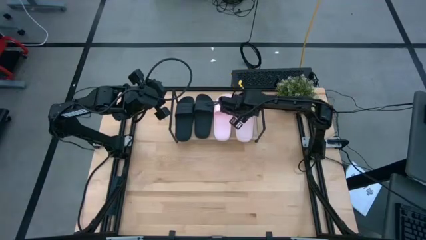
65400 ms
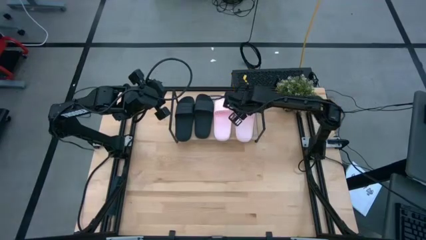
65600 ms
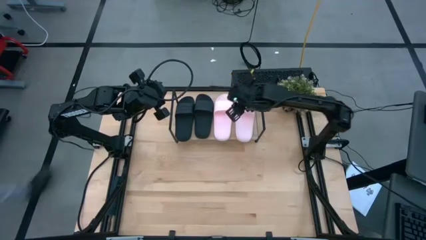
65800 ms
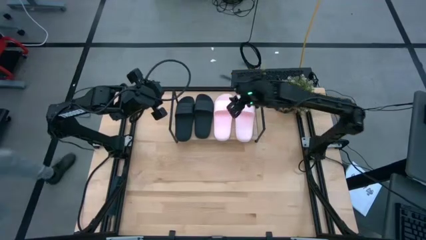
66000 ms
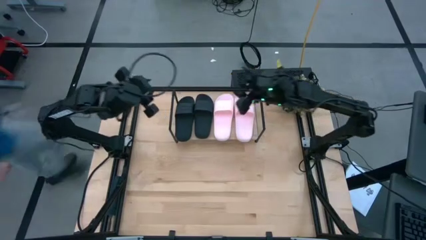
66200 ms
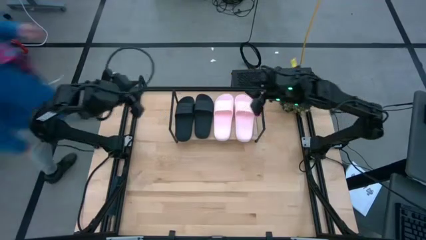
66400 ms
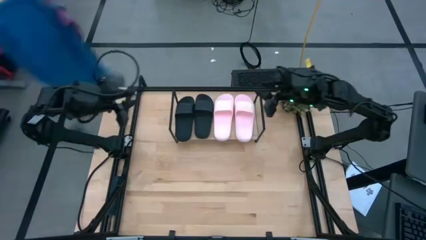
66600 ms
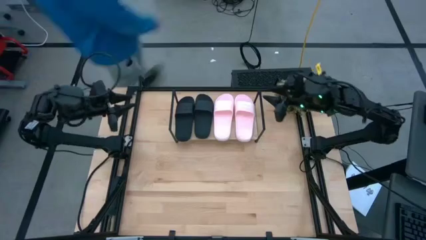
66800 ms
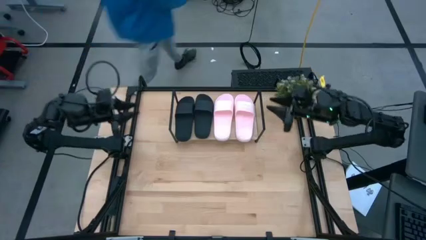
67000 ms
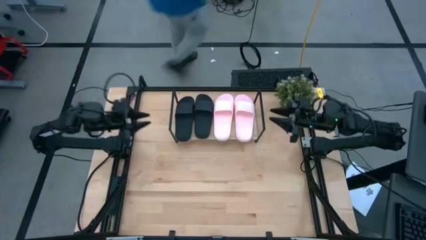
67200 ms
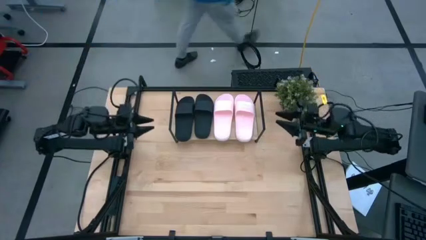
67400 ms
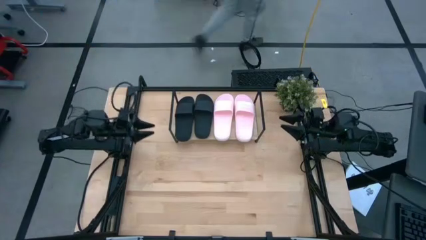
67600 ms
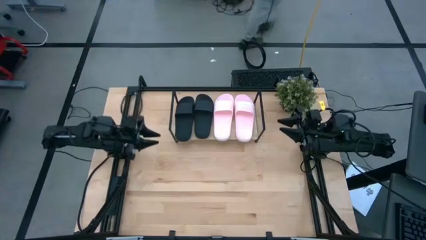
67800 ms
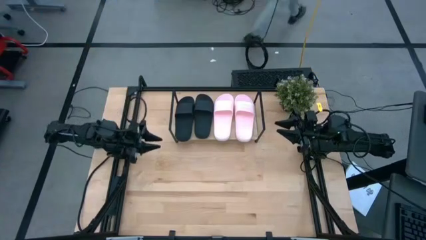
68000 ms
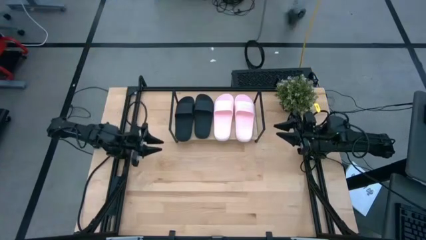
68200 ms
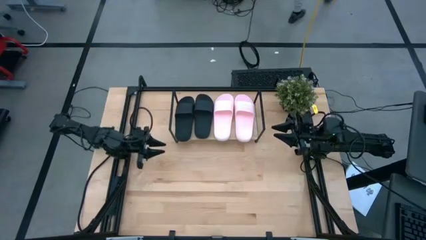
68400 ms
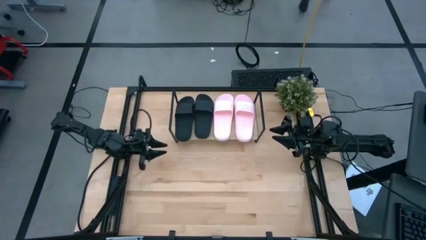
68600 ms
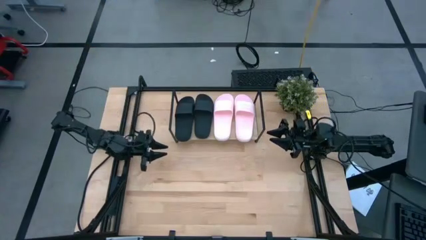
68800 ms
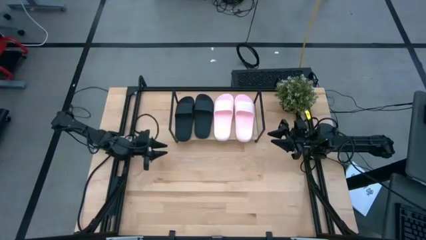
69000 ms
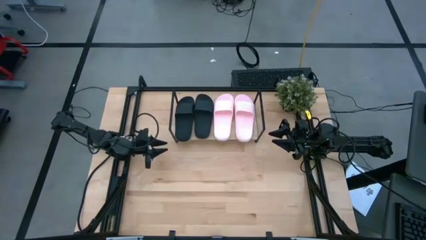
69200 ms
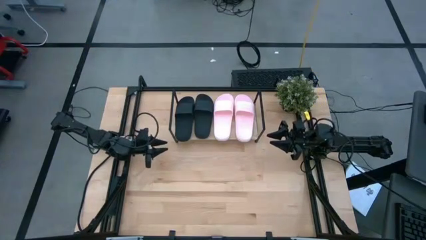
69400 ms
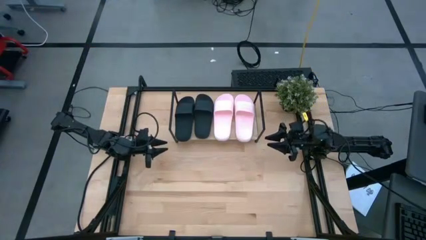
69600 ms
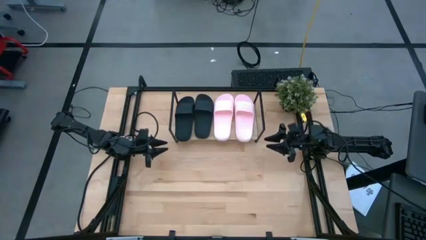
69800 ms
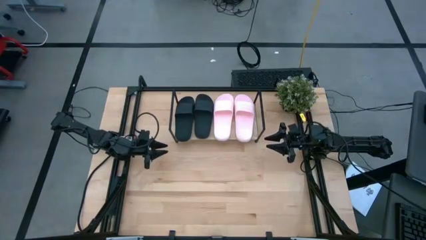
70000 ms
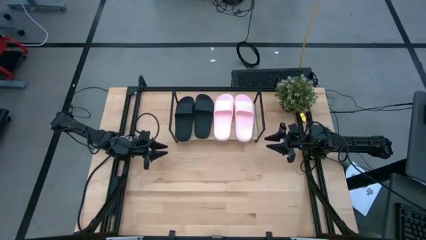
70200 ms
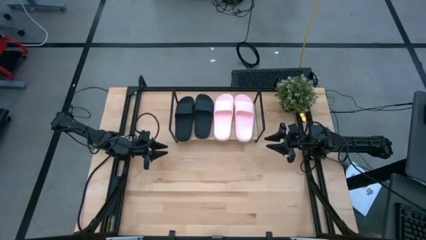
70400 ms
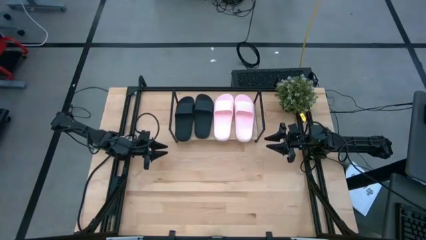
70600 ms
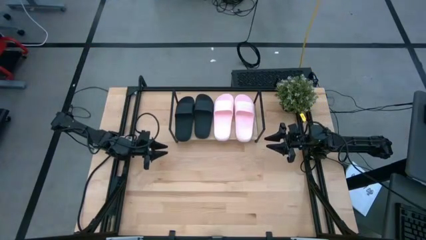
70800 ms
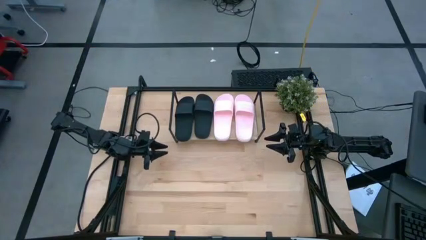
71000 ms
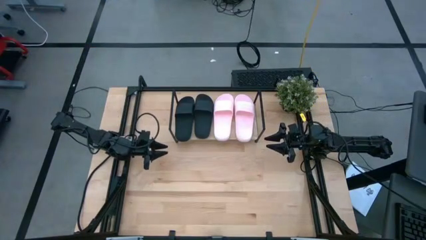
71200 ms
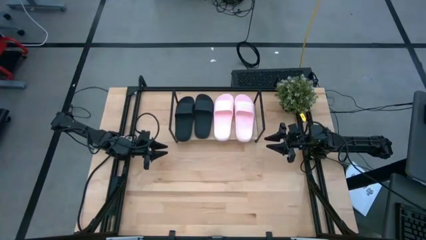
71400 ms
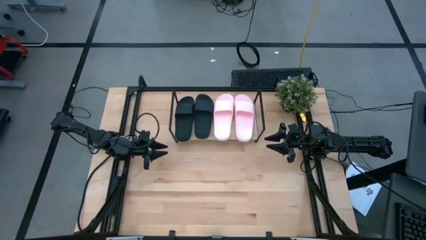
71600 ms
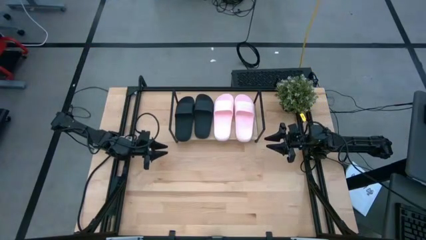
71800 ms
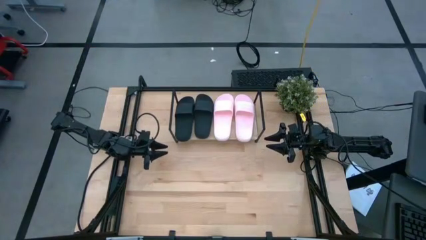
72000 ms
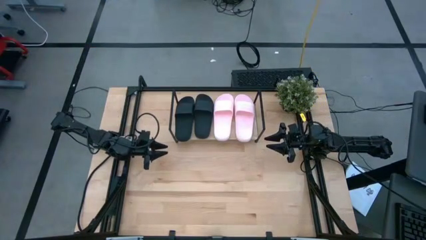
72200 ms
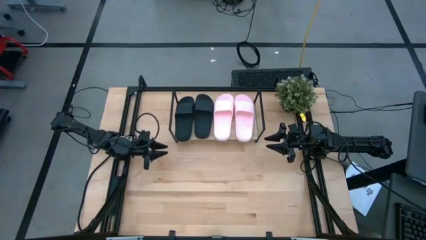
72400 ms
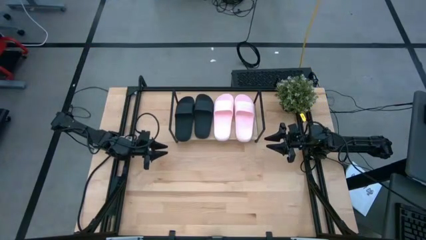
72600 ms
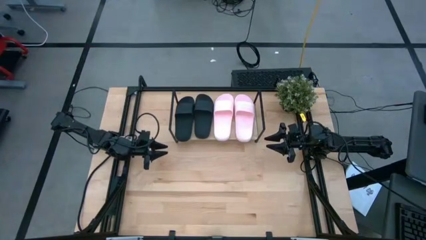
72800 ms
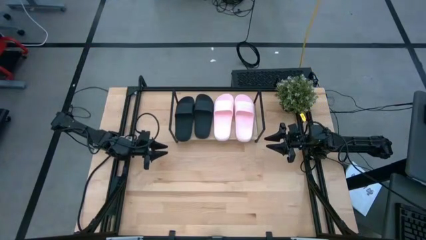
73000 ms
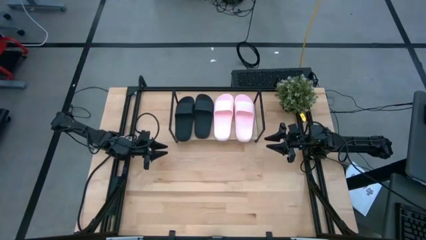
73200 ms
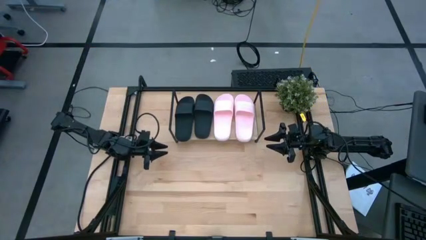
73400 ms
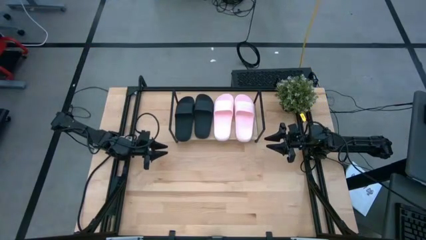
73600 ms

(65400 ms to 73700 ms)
Task: Pick and place slides into the shelf
Return to Home Position

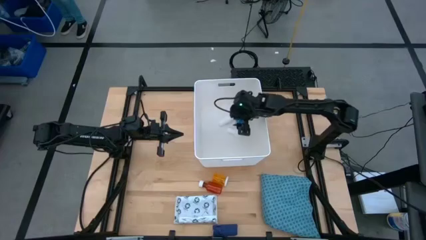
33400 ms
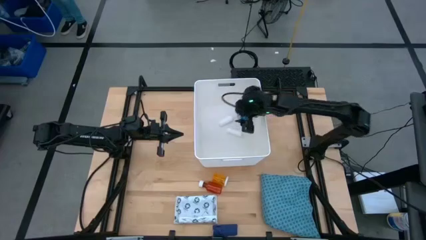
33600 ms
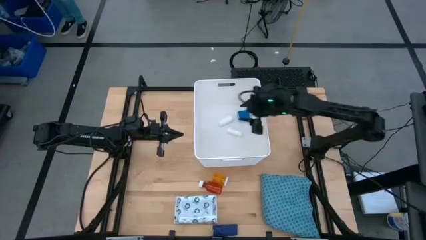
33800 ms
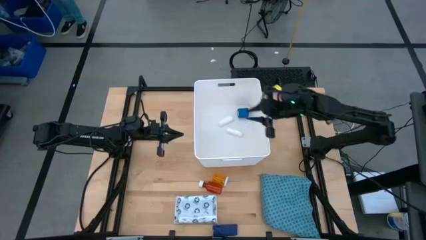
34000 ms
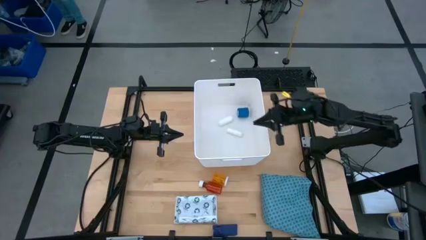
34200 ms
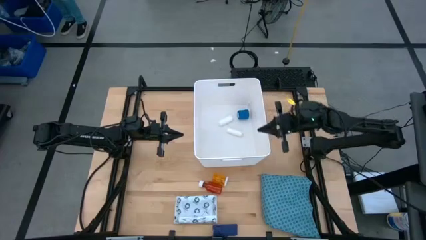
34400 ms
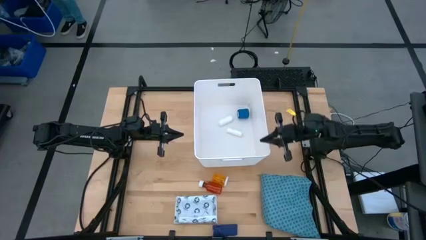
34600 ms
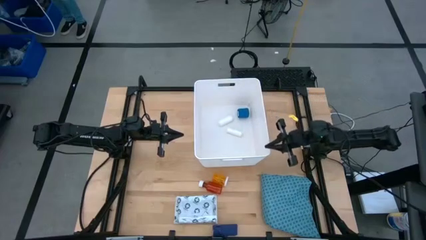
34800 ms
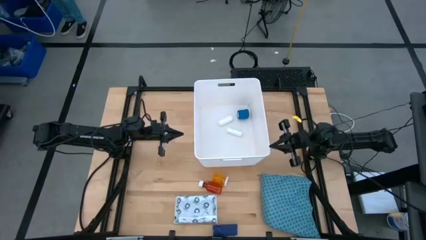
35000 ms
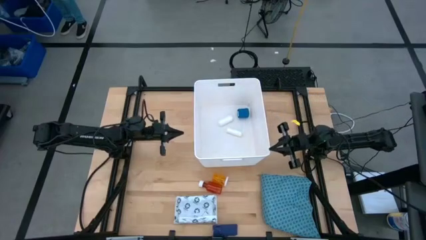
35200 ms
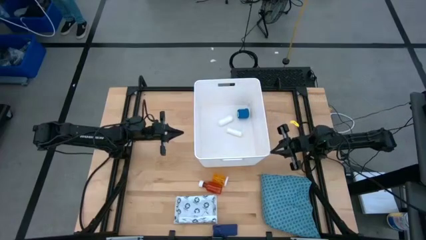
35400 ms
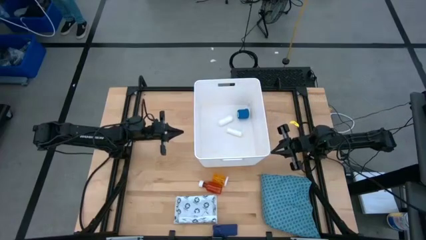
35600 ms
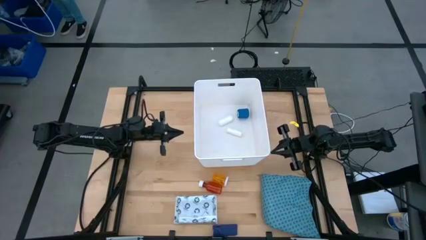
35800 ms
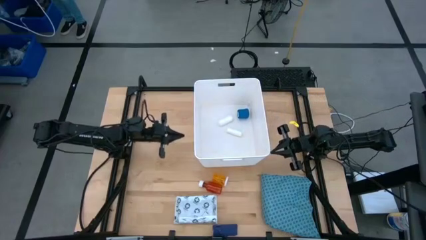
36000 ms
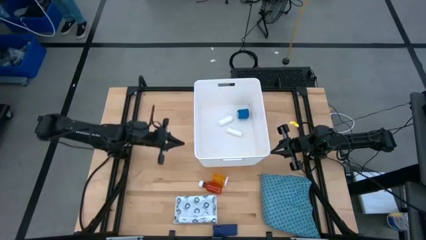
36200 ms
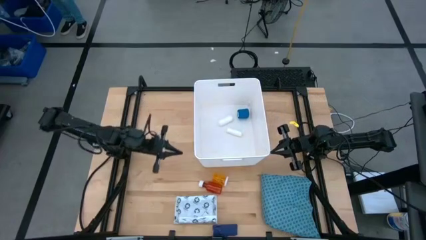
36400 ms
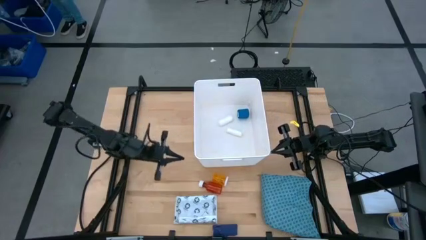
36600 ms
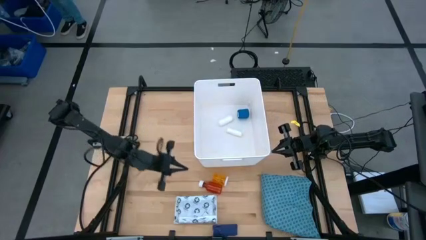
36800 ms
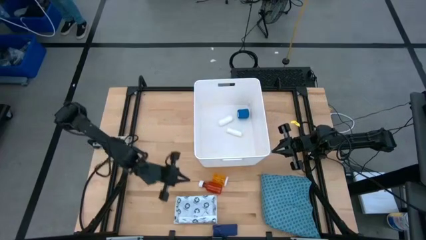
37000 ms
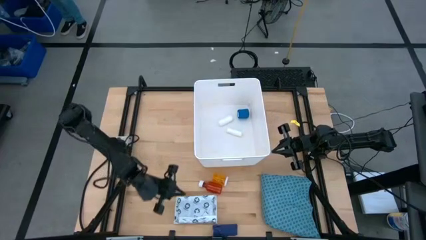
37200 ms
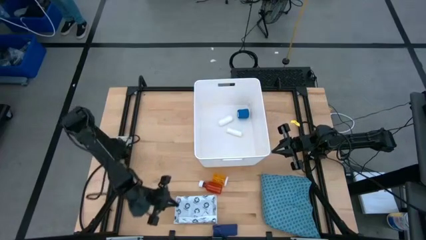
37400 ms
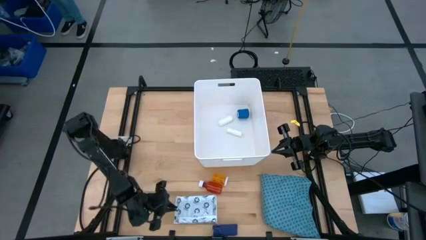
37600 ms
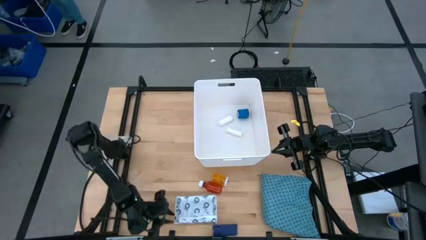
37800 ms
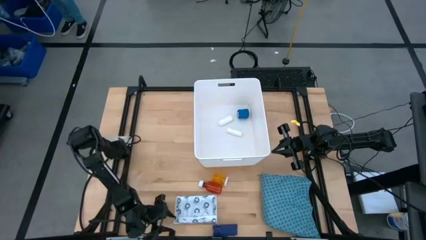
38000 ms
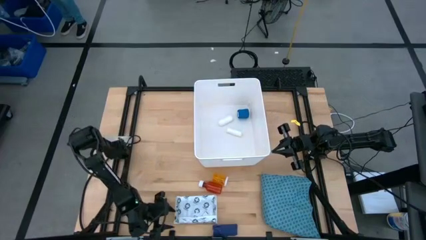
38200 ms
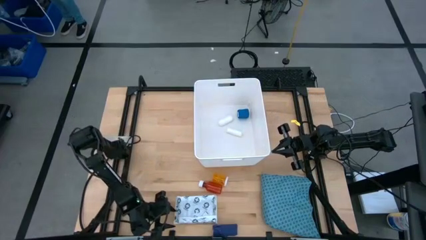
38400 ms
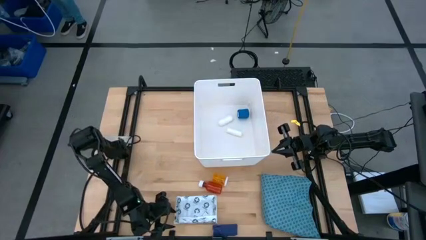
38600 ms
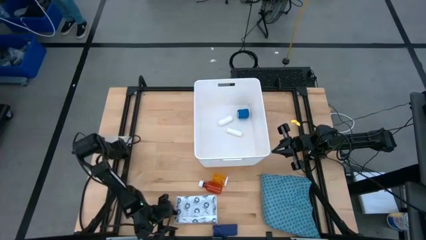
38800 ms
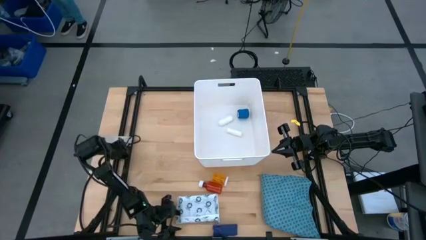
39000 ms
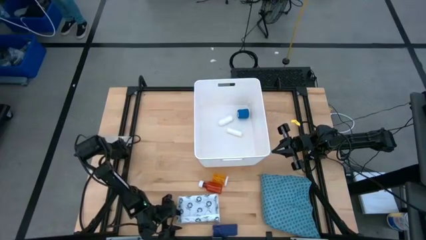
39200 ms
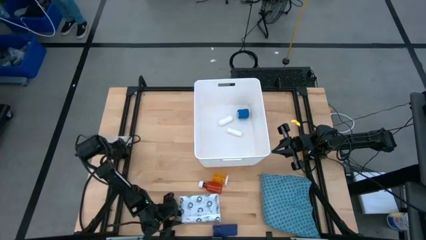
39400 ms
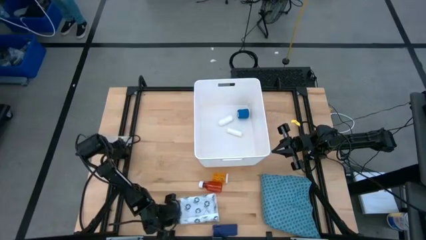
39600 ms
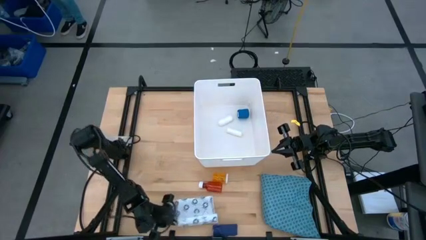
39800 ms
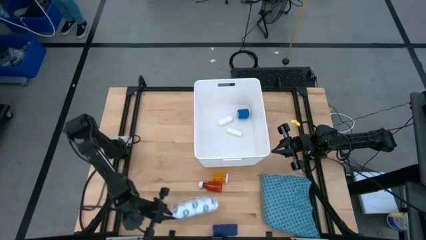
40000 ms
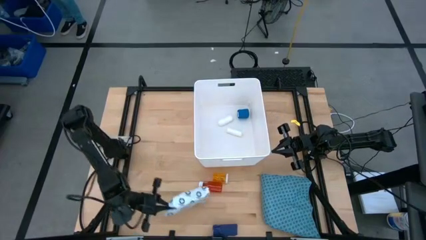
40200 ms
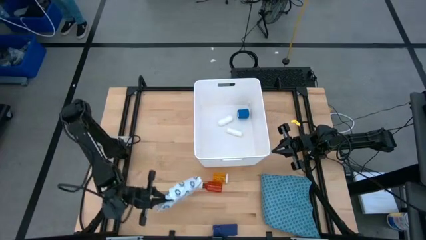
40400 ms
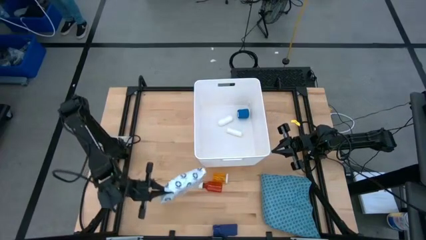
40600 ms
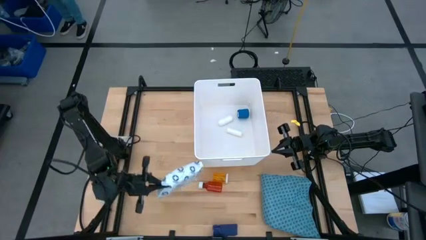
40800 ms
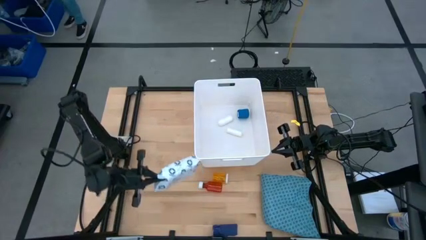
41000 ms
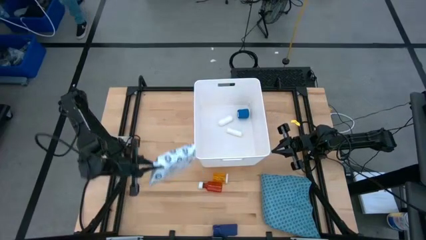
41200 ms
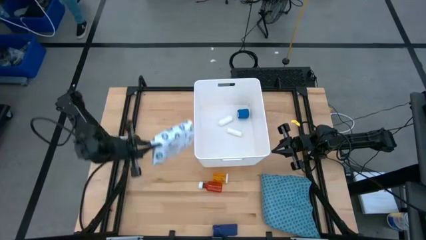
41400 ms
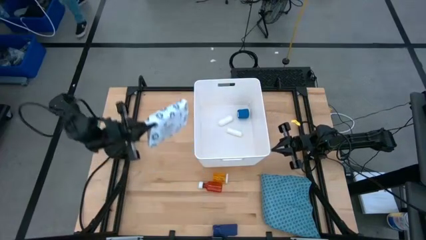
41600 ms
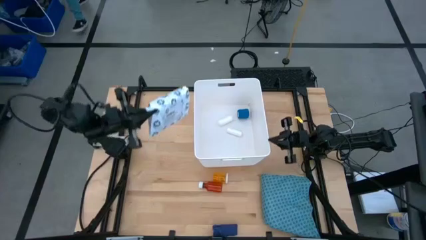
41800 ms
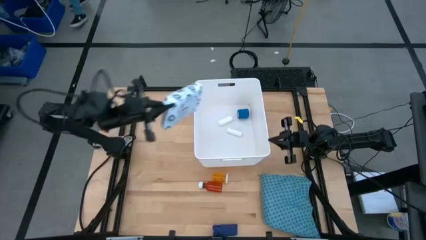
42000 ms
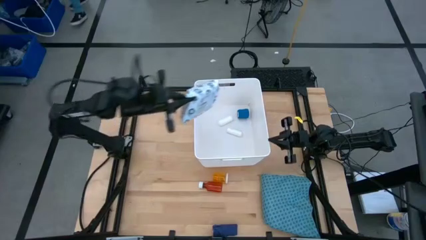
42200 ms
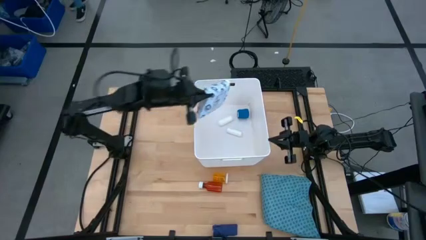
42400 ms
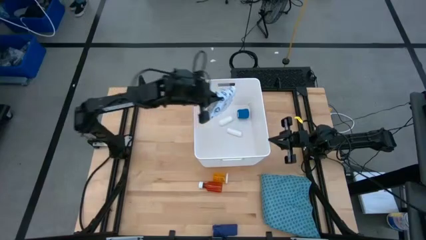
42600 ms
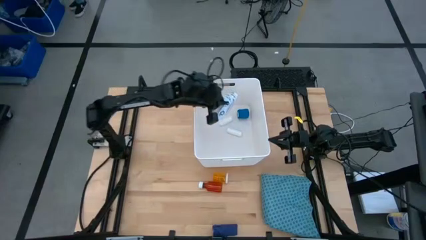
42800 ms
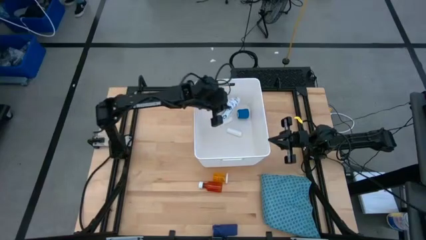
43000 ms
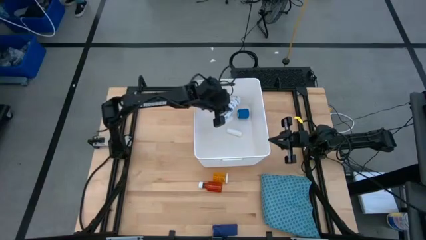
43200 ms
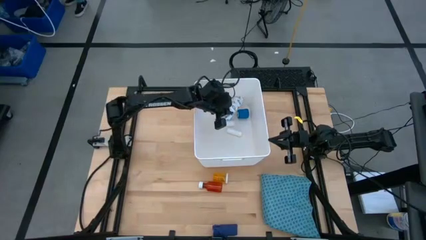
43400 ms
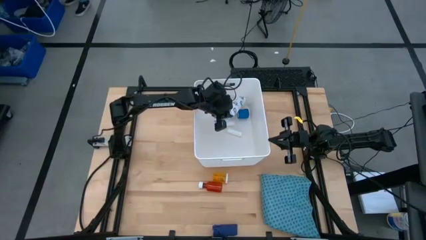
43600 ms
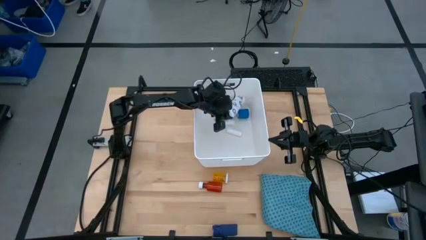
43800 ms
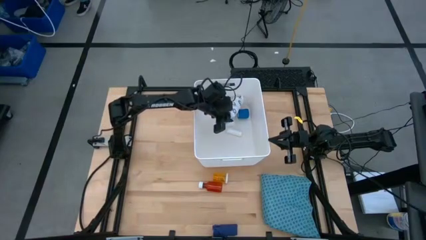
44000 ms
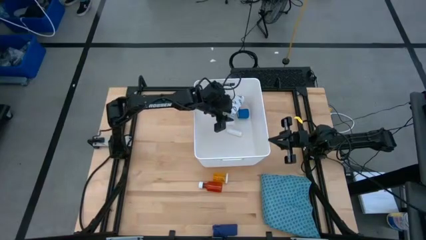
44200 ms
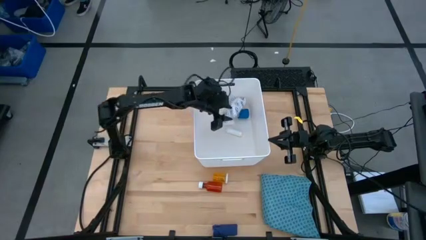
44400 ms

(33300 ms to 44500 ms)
Task: Pick & place medical supplies in basket/bin
Put the white mailer bag into the white container
